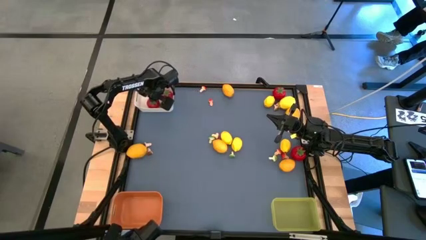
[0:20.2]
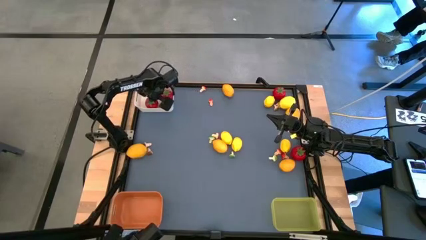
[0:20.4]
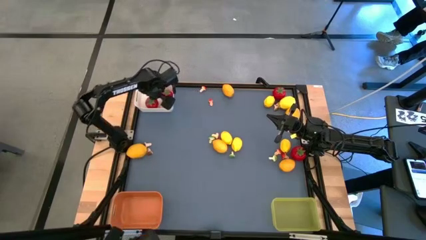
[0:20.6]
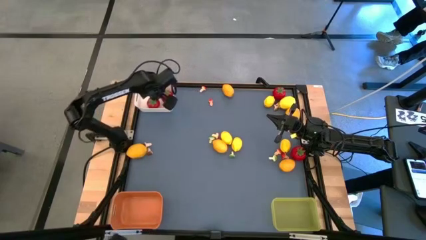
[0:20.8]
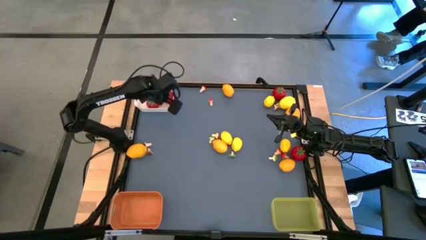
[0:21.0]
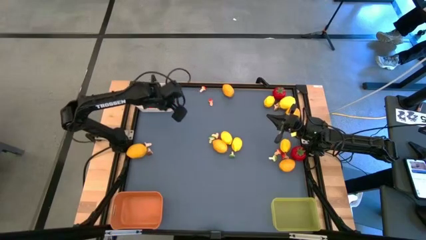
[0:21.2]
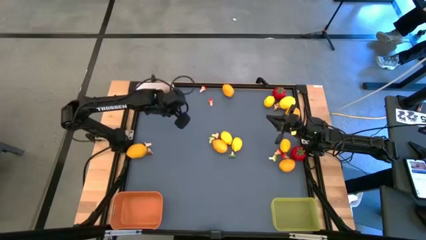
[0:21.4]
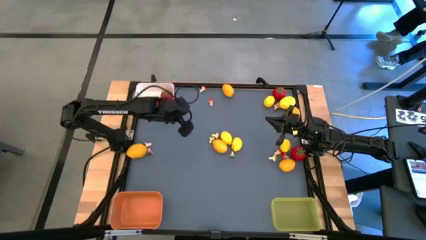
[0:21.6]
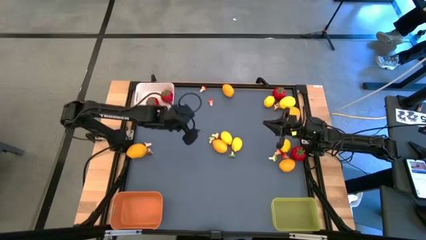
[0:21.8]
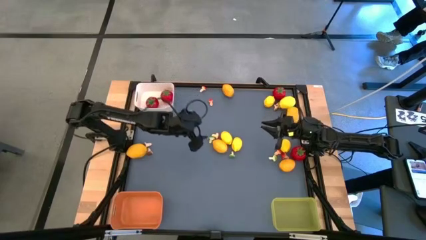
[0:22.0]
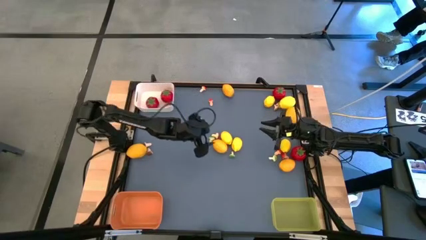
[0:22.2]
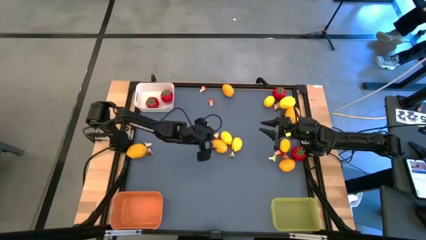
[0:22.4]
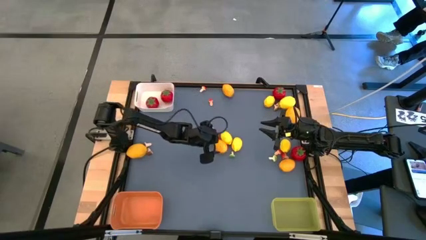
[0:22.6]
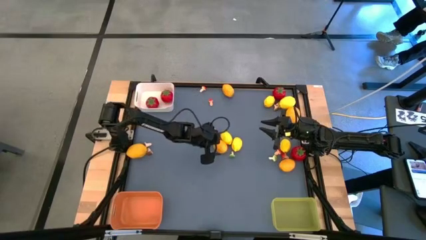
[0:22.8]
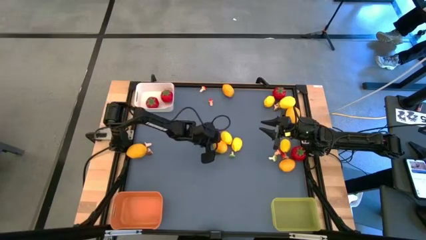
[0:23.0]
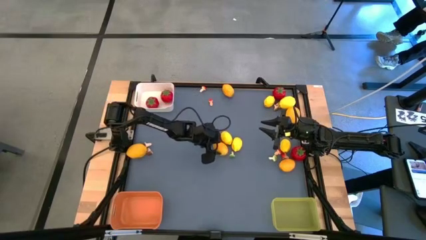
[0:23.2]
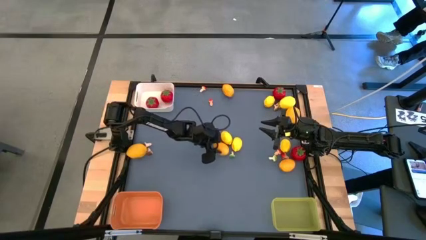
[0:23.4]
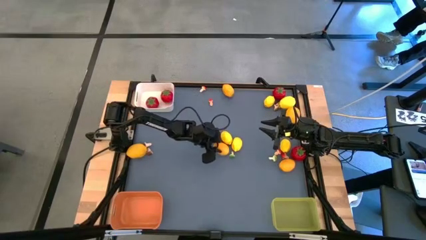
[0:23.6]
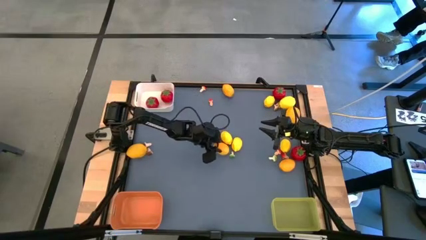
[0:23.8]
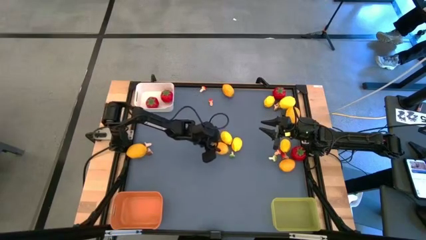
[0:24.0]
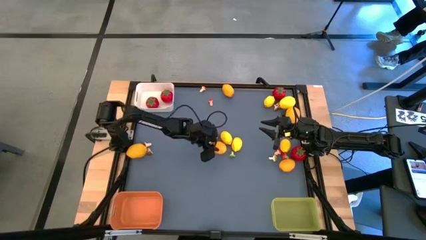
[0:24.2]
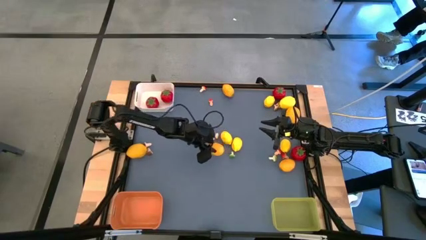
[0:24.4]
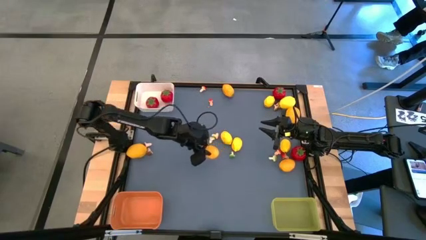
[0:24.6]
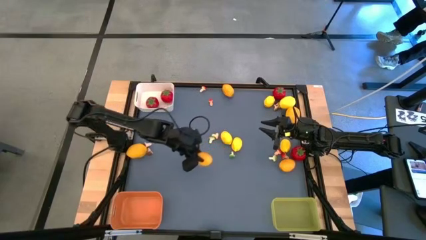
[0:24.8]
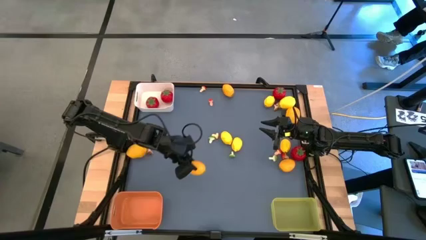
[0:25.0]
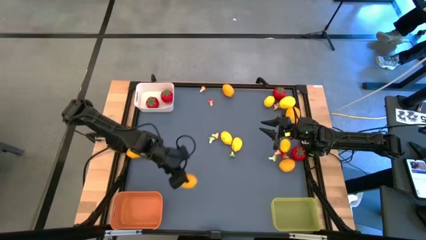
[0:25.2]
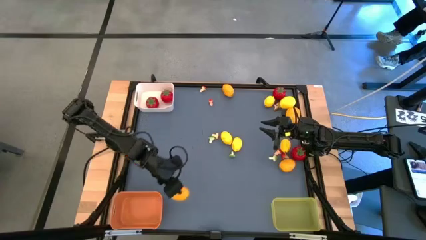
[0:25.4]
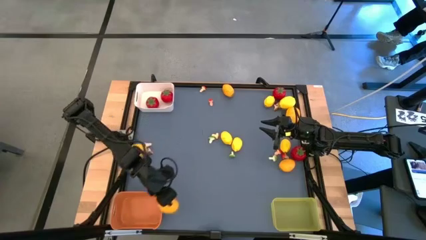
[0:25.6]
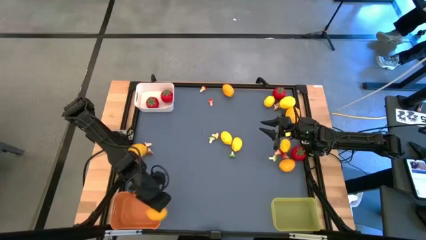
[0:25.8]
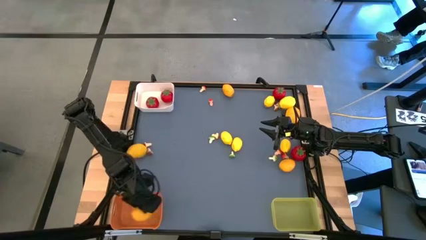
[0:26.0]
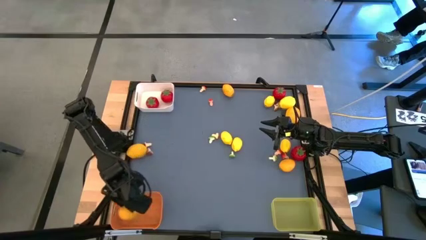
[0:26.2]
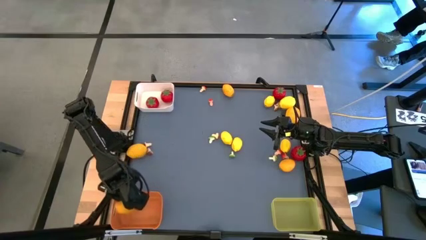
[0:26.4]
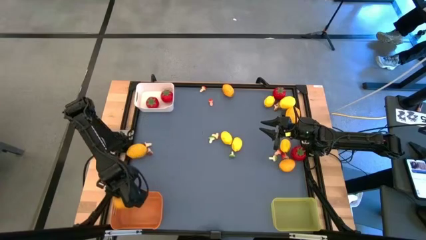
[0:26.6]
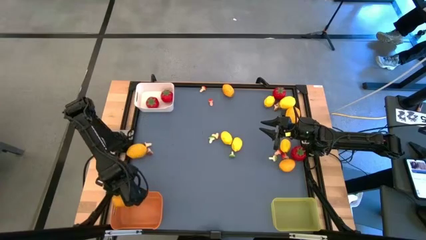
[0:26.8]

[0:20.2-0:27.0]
Task: Sort produce into baskets
Put the yellow lemon into the orange bin

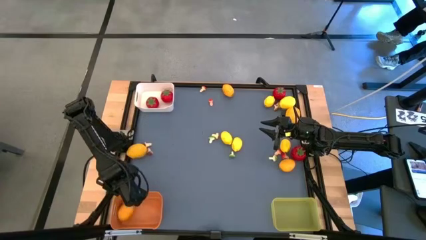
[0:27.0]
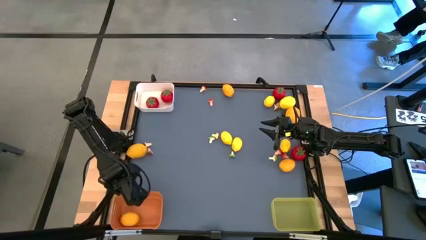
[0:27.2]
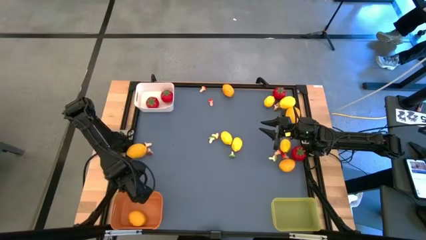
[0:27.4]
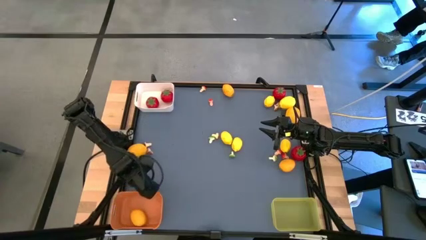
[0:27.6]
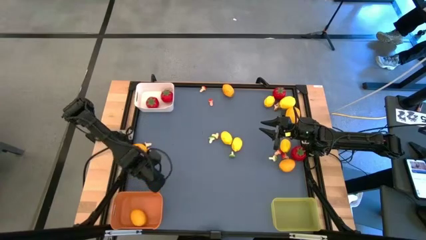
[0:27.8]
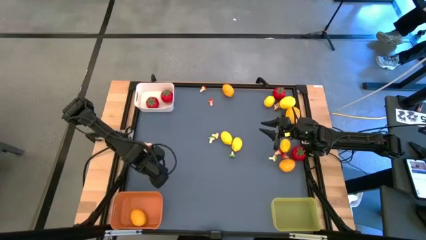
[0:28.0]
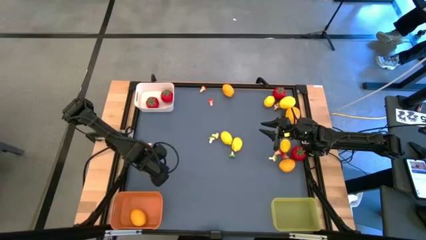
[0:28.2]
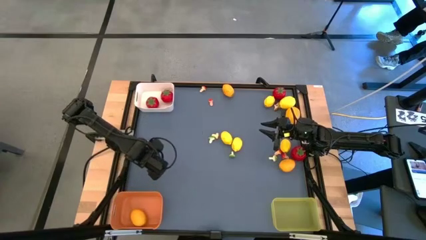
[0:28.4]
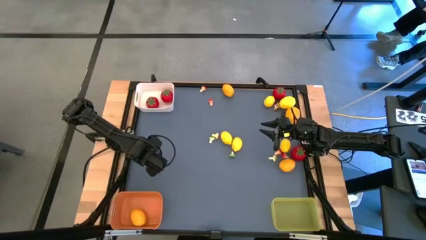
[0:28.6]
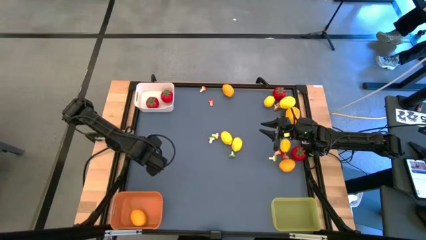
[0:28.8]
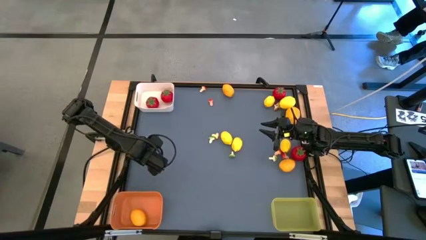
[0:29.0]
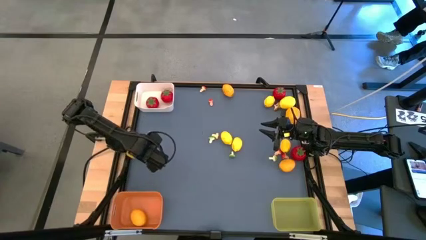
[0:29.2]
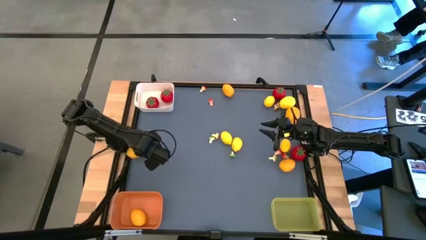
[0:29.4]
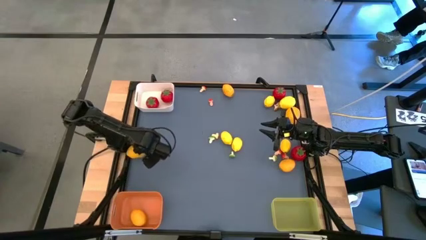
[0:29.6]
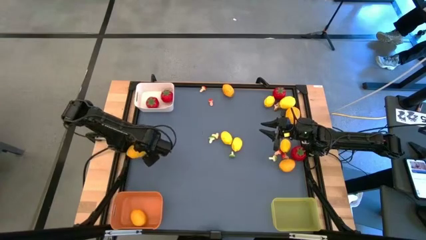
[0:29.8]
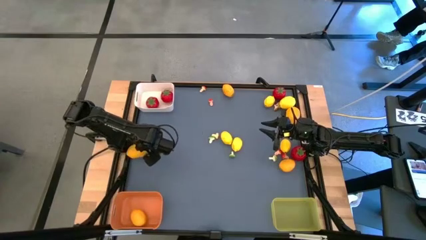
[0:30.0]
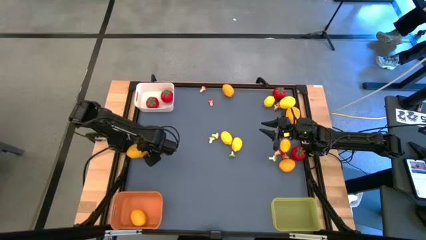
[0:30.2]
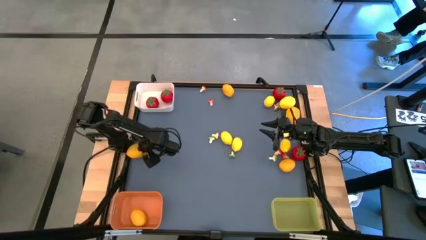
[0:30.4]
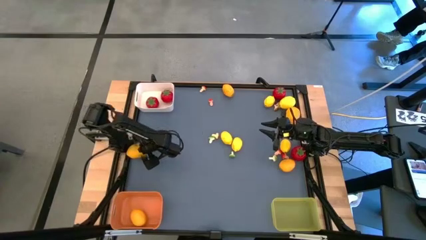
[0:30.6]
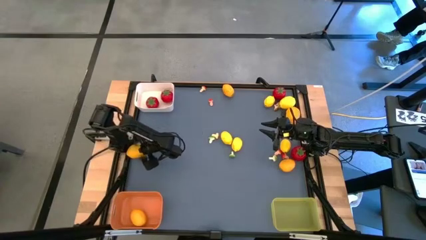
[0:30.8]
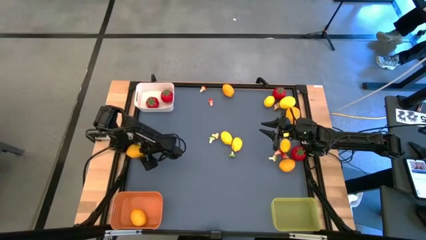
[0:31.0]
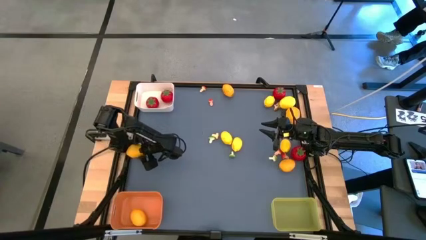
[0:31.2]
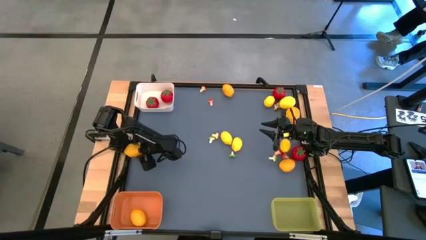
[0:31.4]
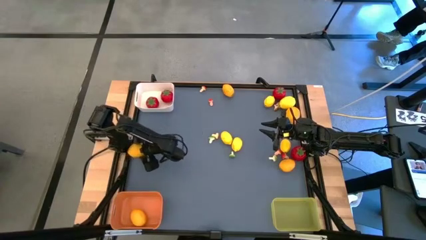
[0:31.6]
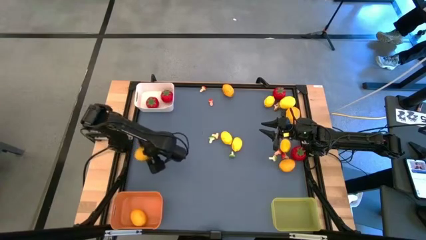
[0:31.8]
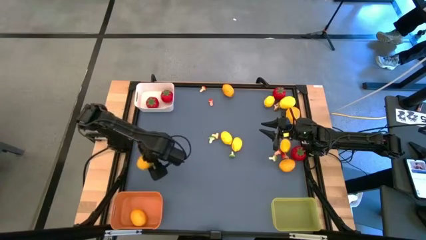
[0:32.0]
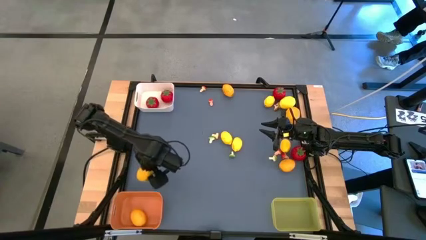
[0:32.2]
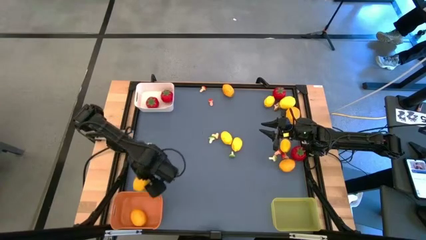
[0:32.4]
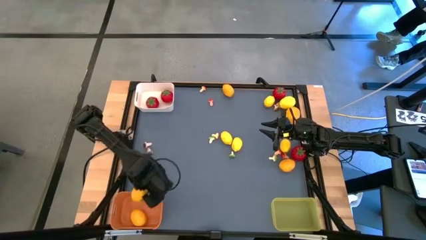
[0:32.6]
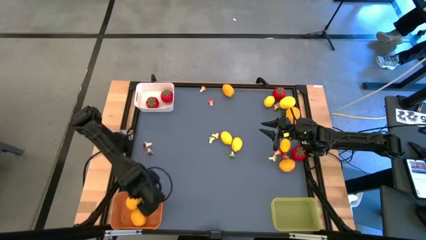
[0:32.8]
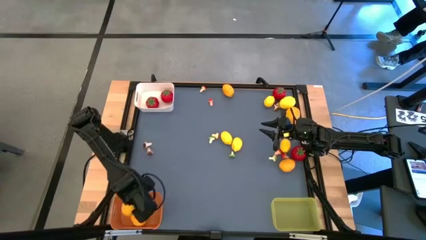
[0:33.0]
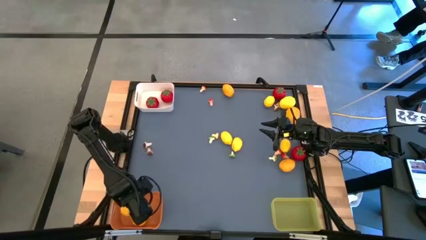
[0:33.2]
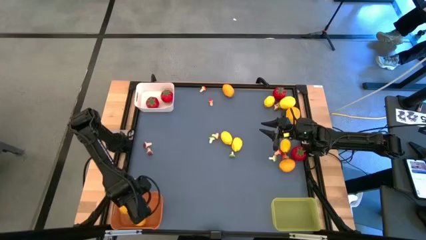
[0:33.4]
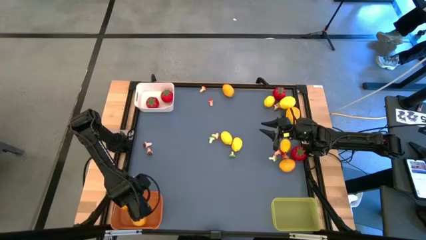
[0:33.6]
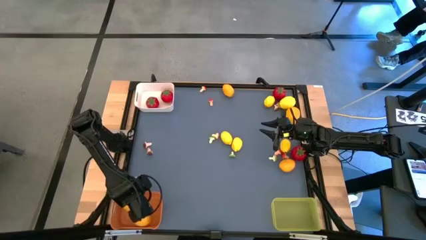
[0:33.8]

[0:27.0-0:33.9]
Put the yellow lemon into the orange bin

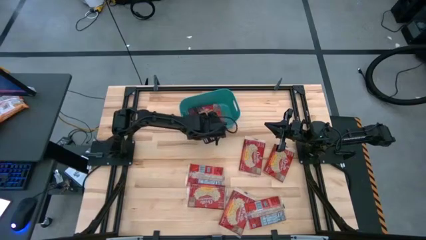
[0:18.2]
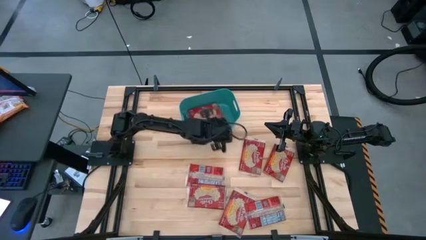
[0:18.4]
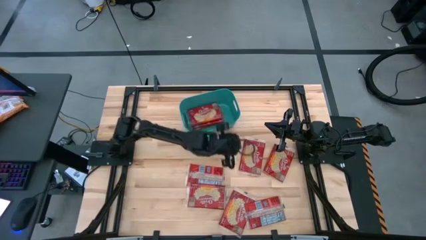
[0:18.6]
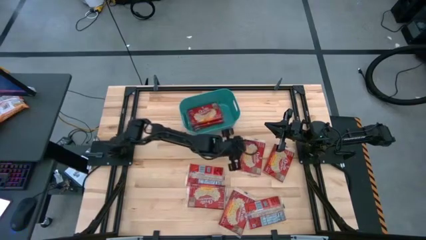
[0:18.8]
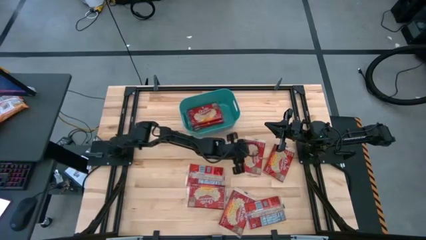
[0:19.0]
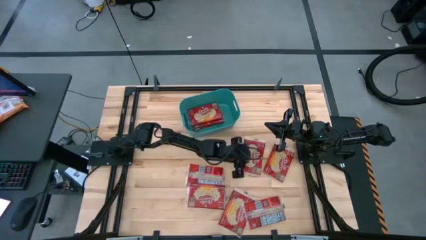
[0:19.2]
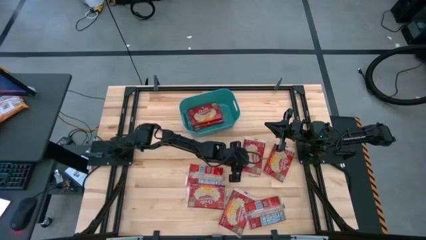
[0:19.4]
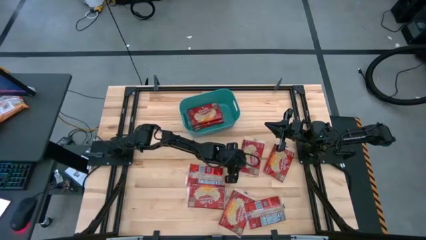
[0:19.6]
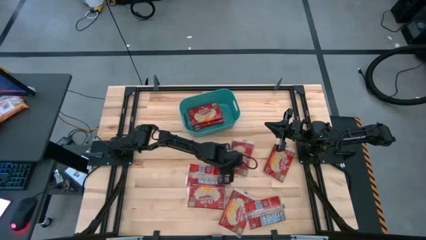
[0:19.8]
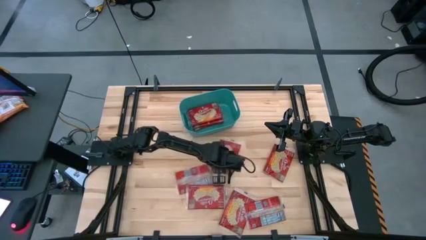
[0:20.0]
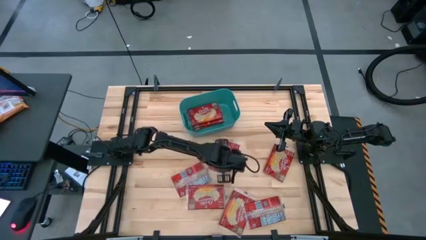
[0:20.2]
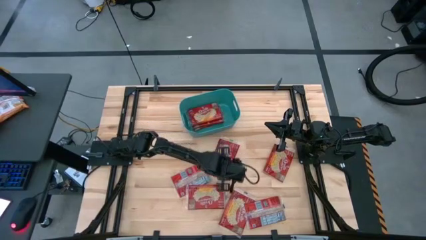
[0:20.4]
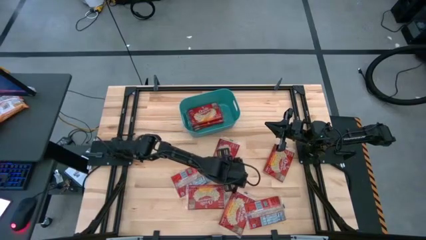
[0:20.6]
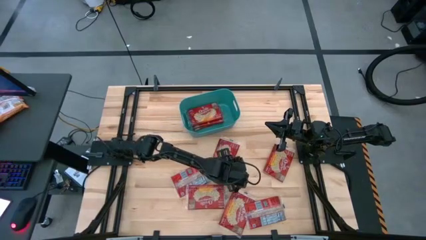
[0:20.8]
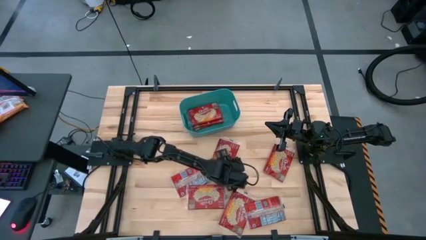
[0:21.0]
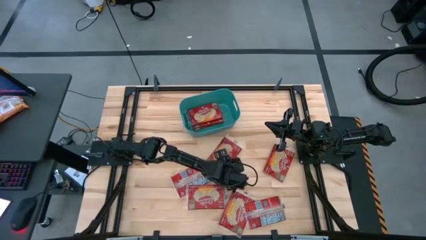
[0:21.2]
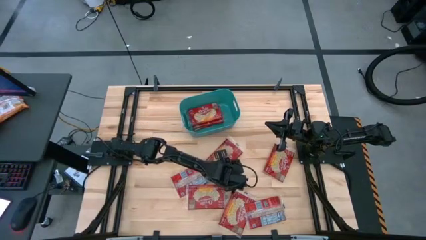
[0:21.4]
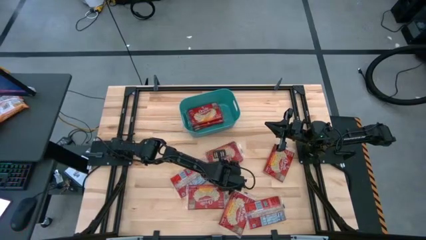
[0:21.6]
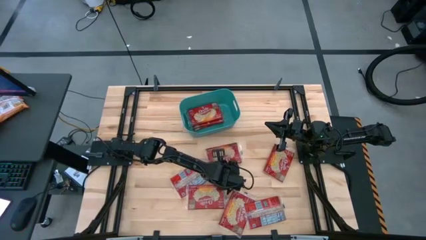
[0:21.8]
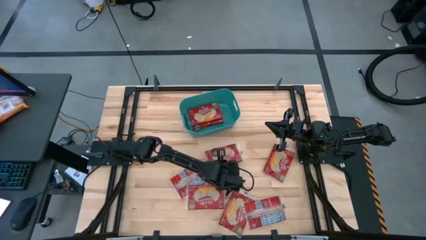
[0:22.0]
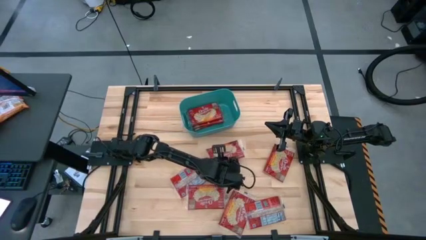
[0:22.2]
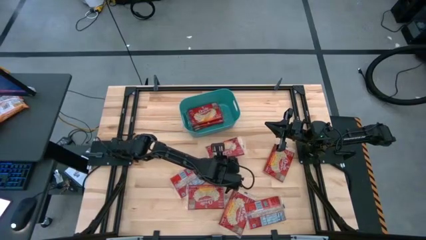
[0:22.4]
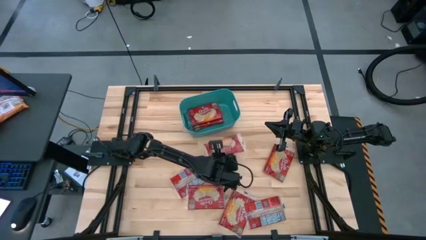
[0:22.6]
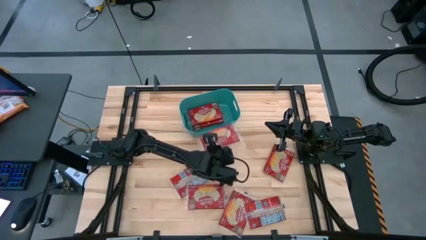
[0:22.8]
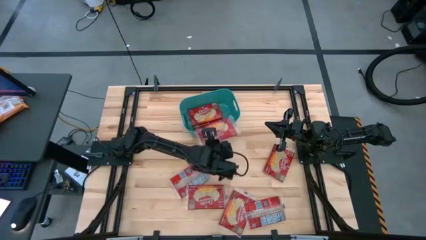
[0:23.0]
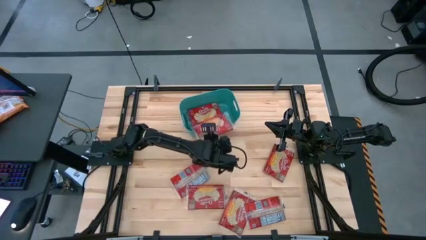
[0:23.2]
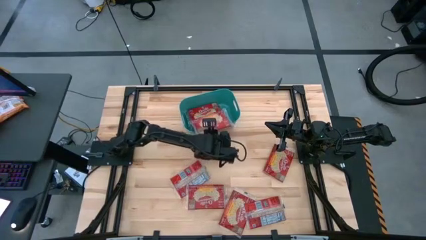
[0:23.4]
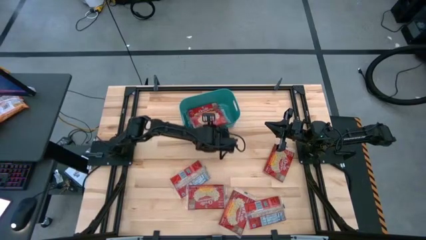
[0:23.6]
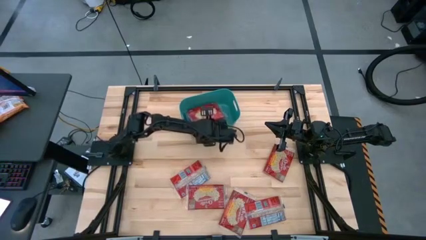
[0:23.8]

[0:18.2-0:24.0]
Task: Sort popcorn bags into baskets
Put the red popcorn bag into the green bin
